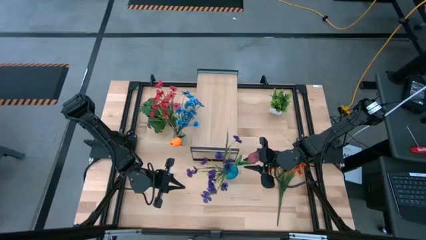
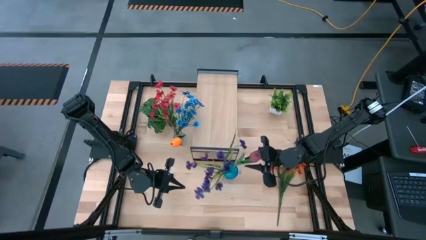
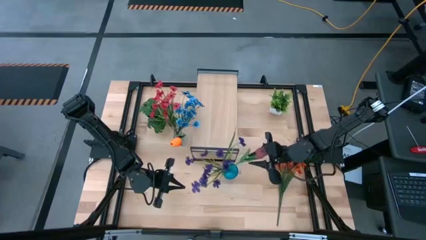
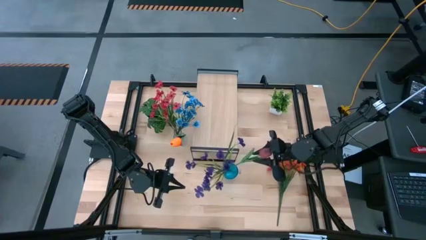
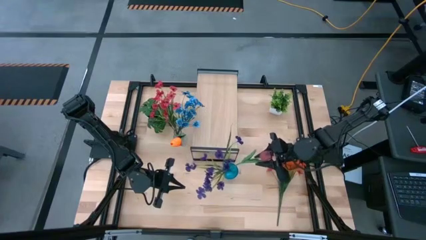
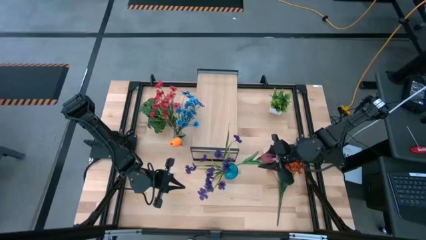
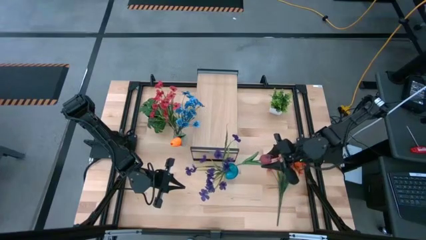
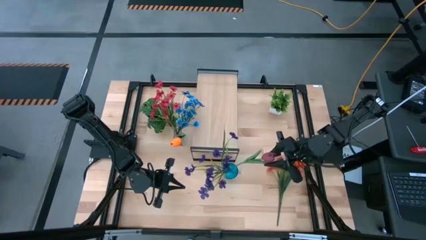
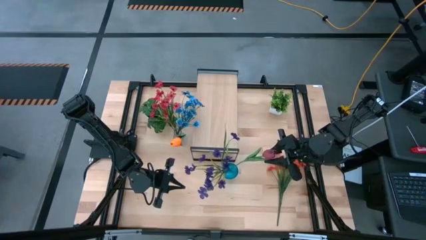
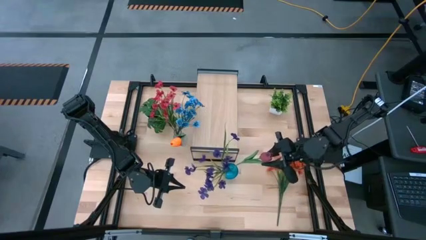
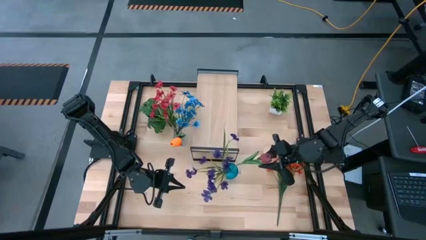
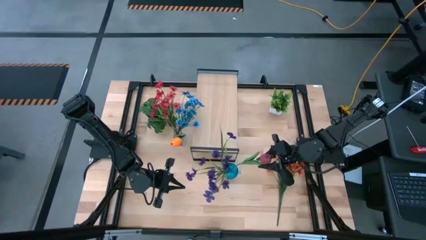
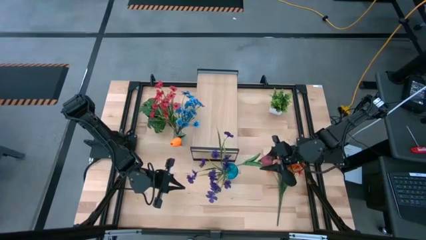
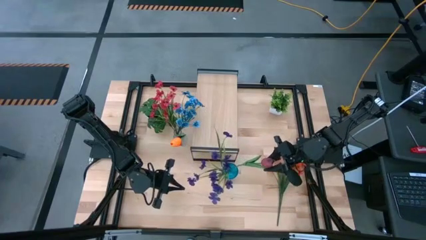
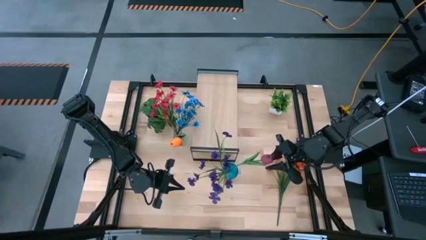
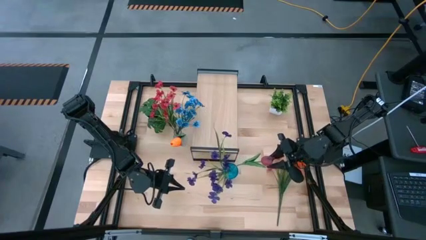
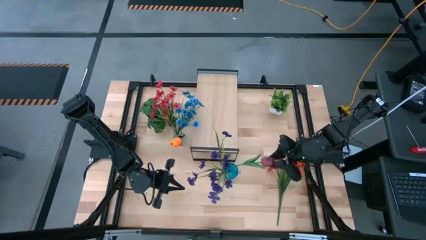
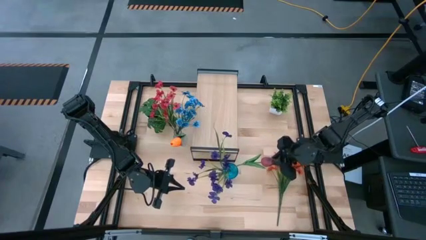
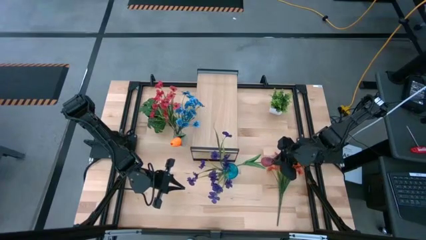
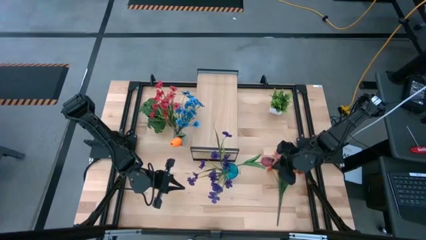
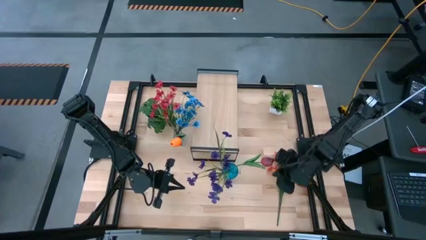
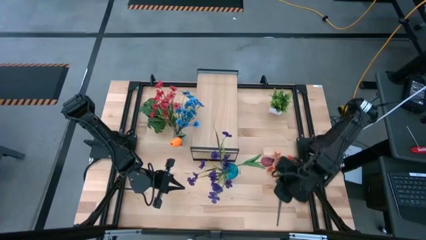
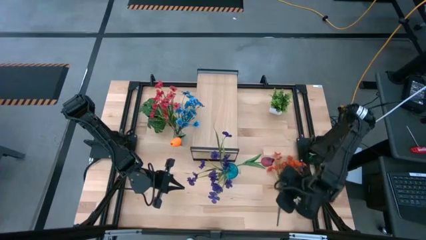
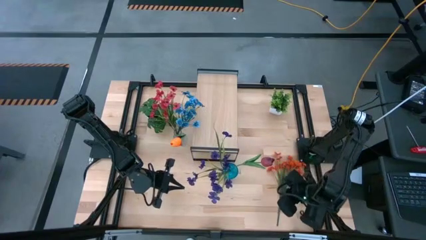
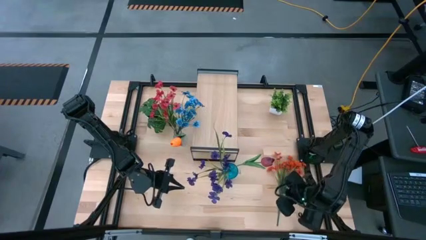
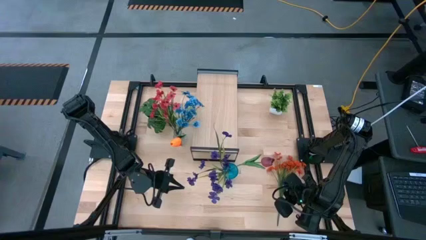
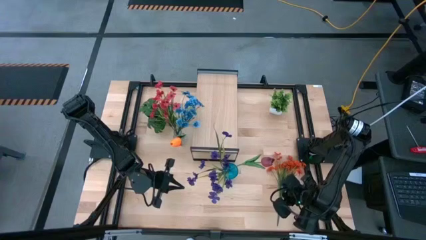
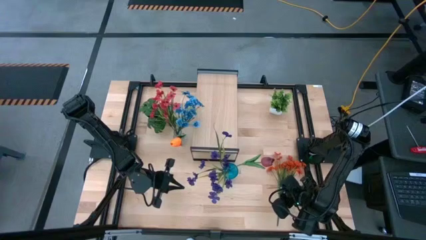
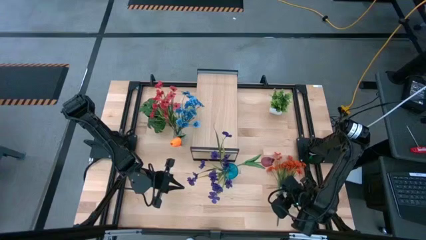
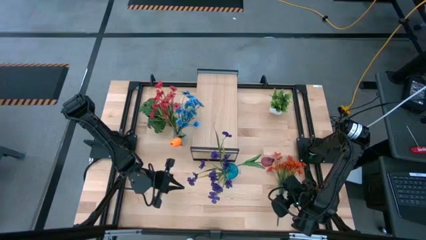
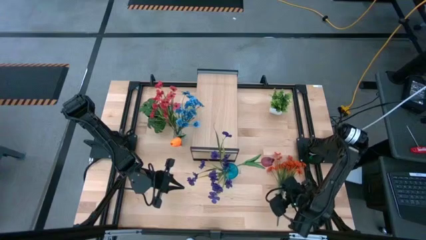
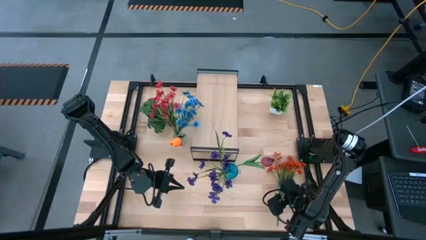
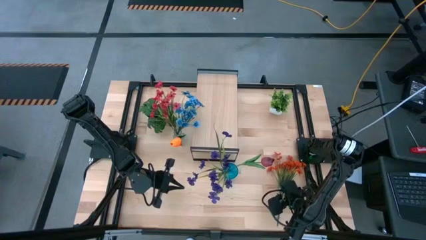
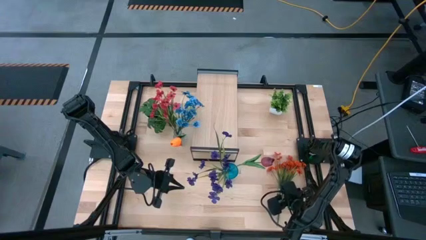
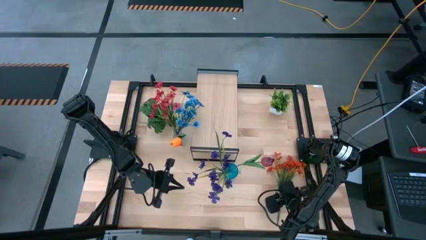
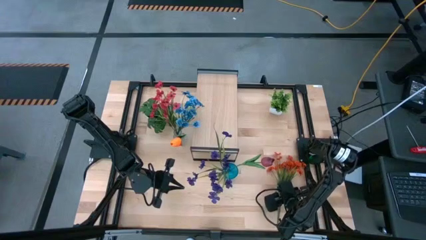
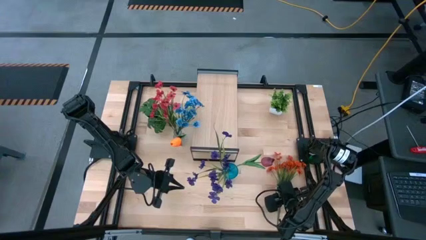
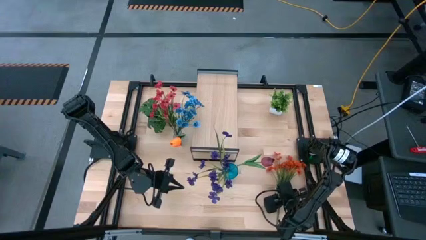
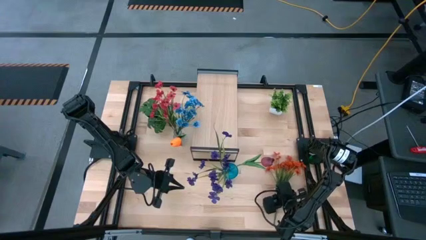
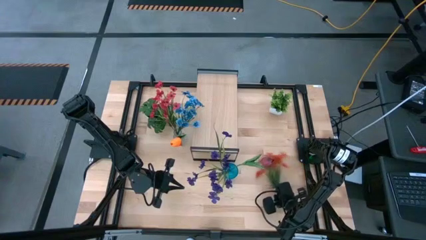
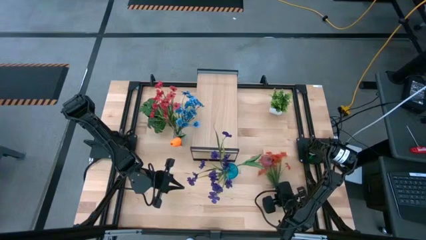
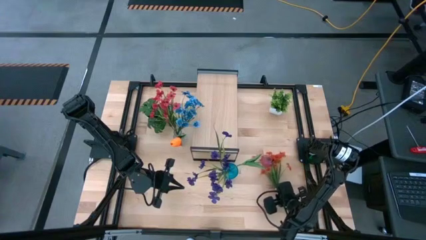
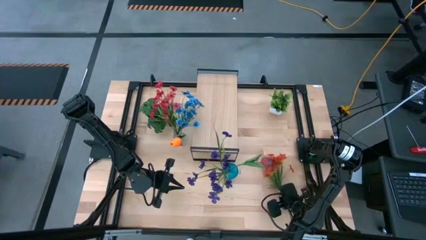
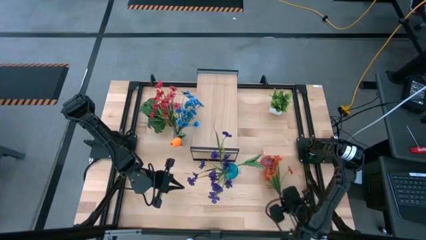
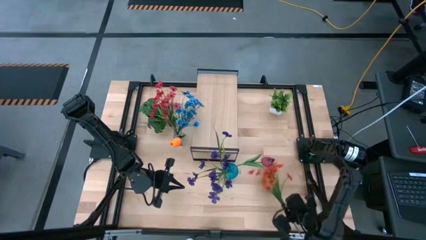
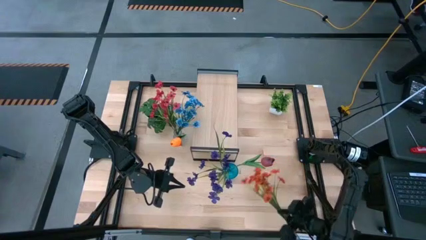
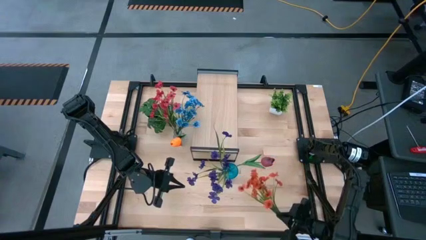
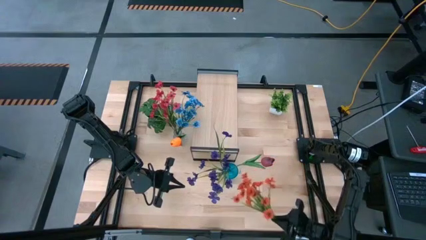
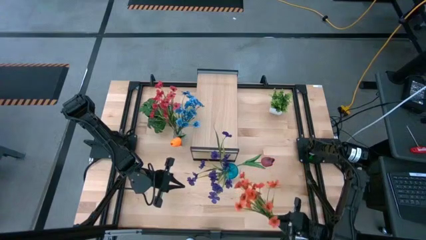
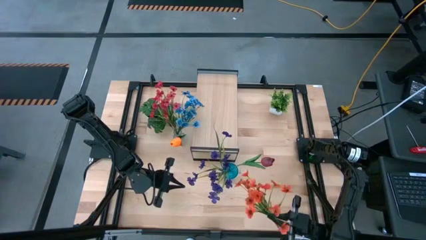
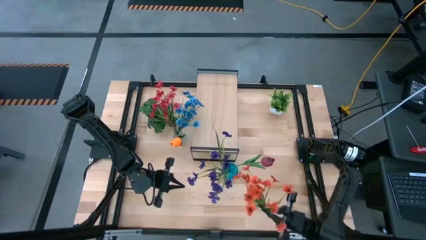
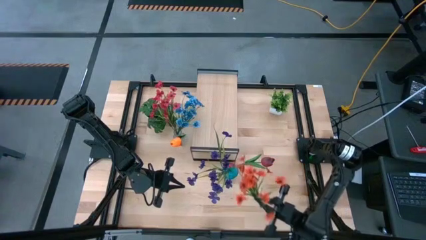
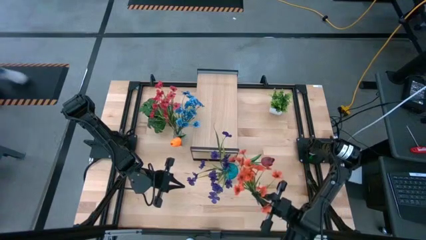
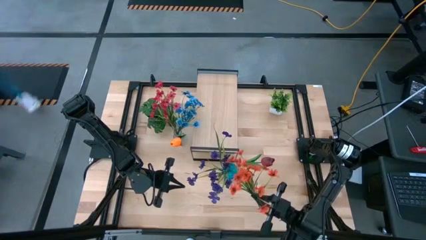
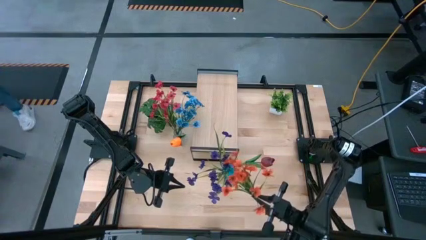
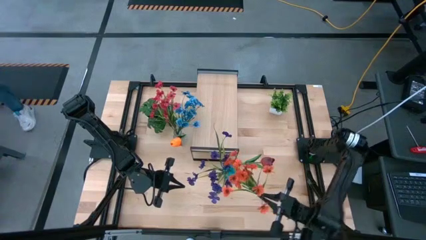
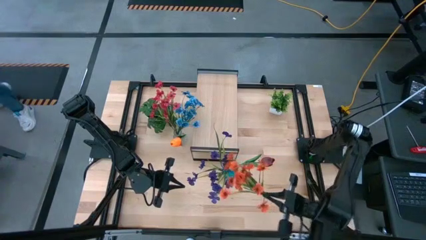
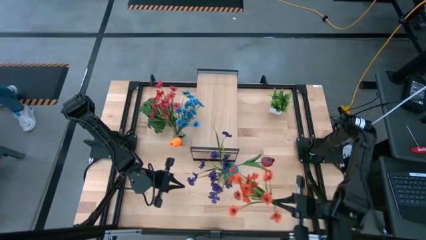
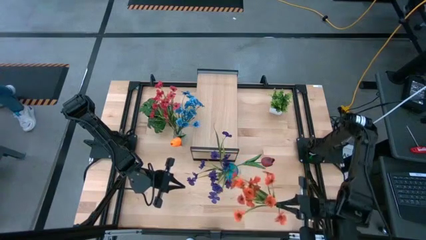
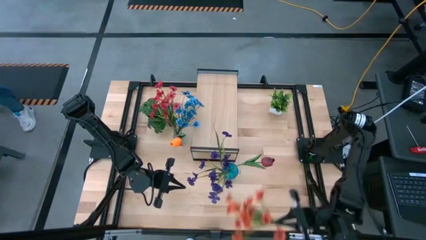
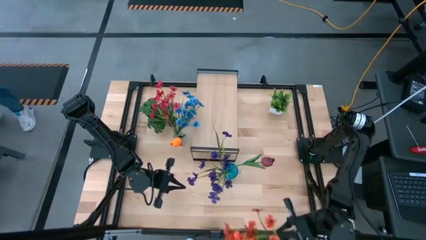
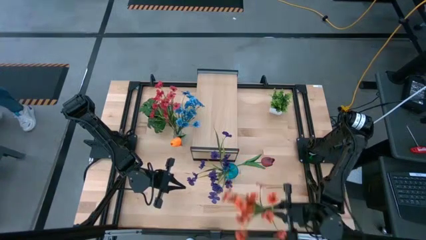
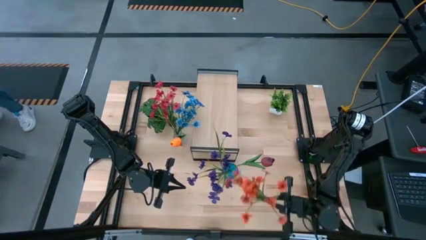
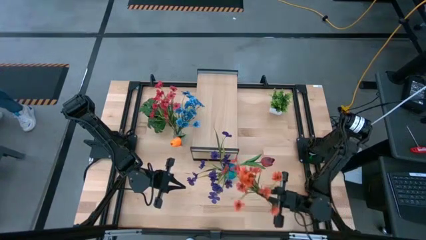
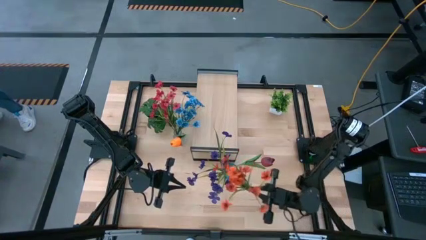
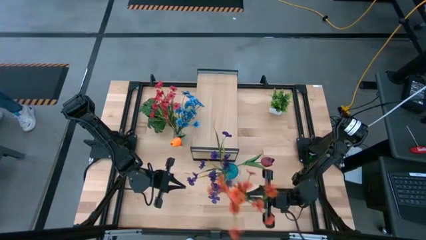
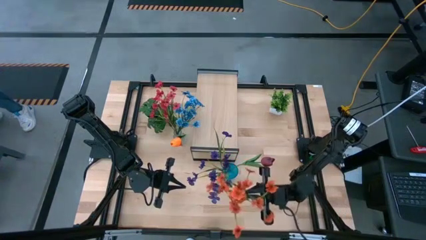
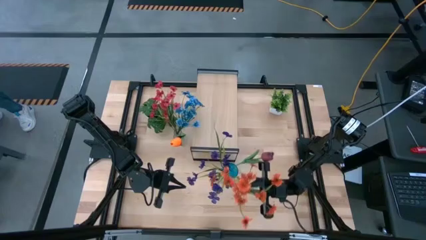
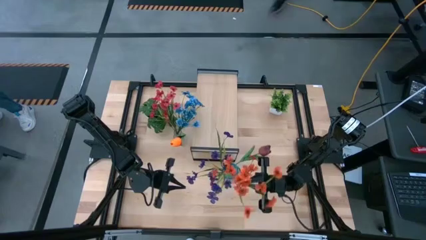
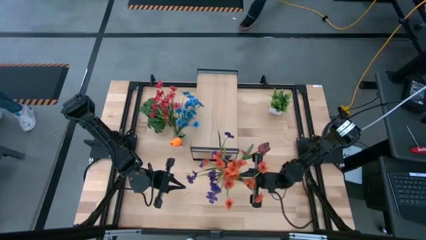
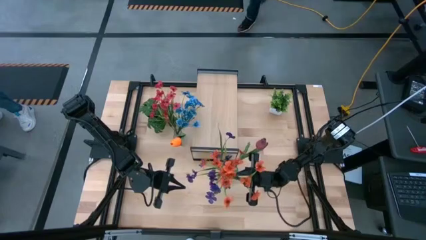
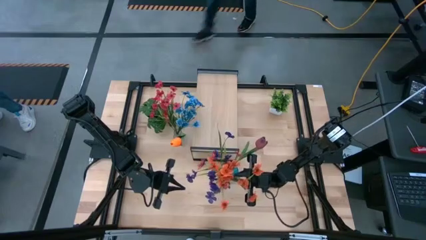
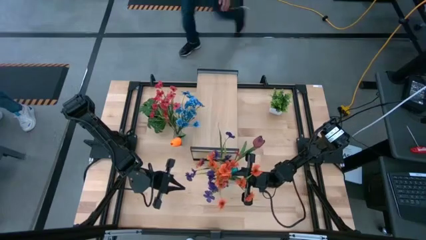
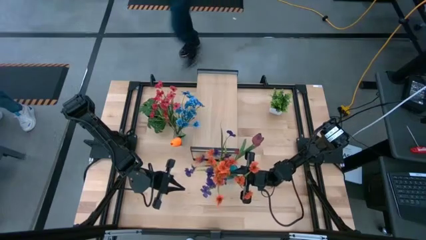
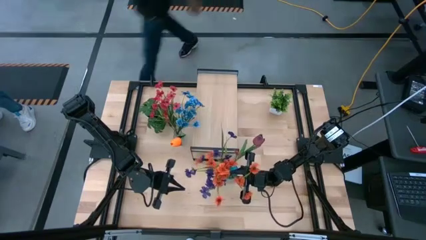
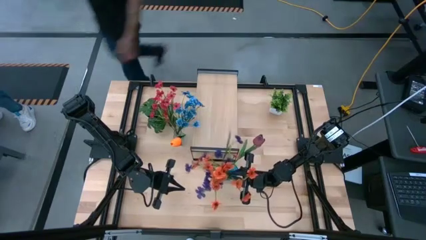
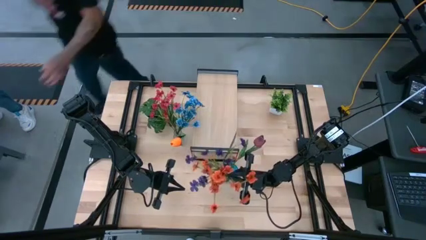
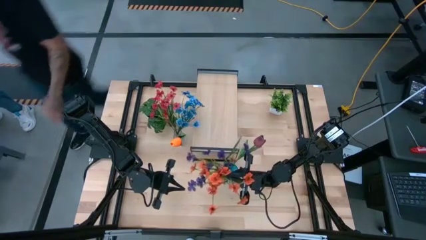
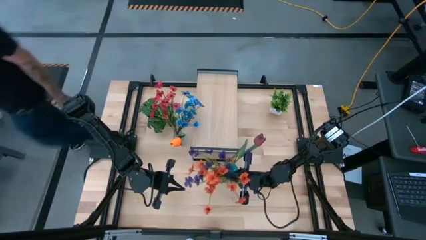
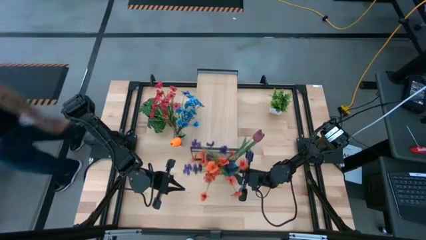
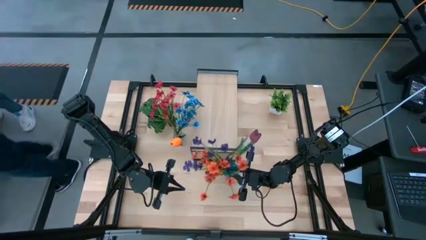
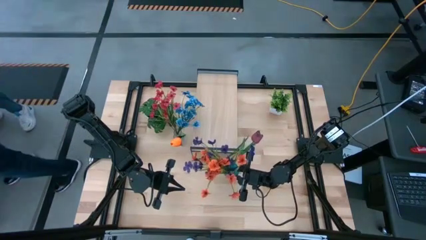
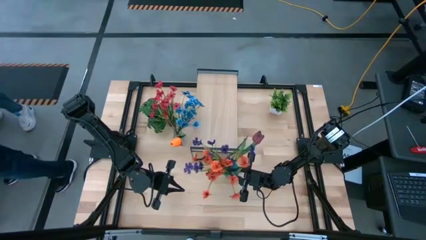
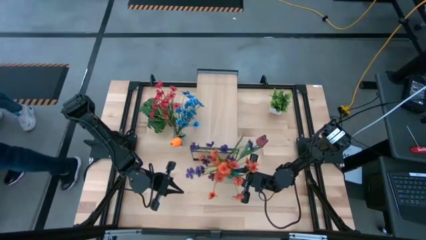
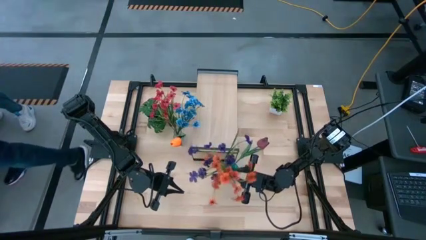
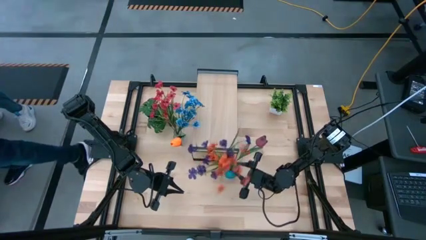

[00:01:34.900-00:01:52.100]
Task: Pick and place flowers into a vace then onto a shelf
Put the orange flowers into the blue vase
